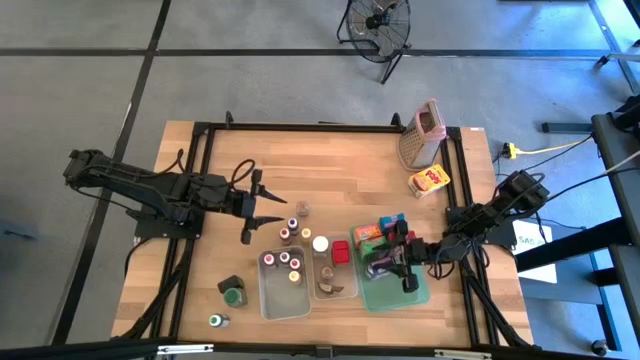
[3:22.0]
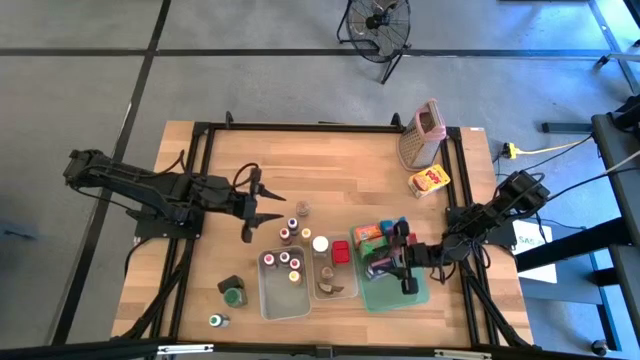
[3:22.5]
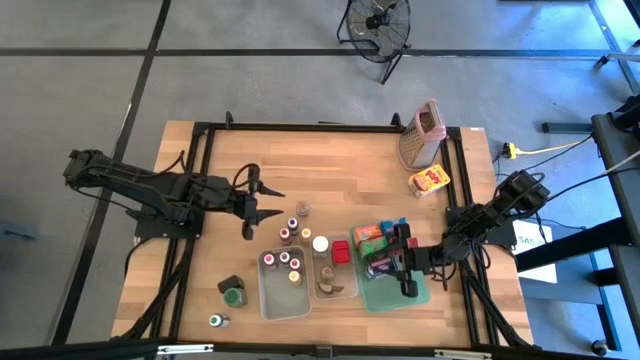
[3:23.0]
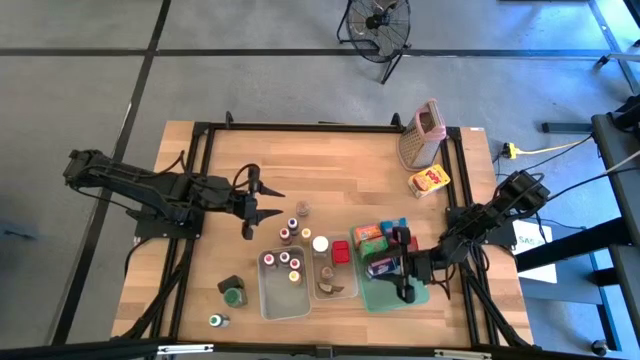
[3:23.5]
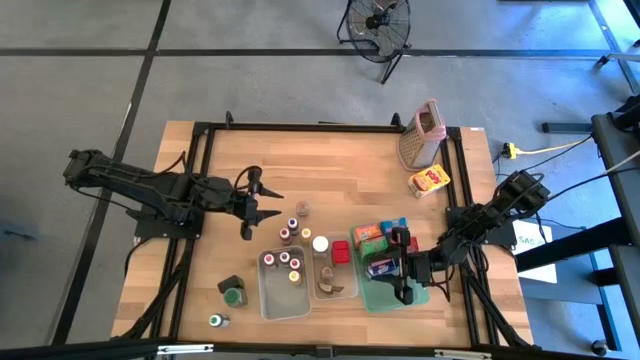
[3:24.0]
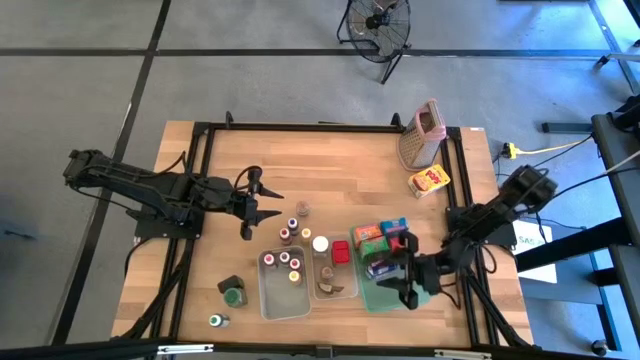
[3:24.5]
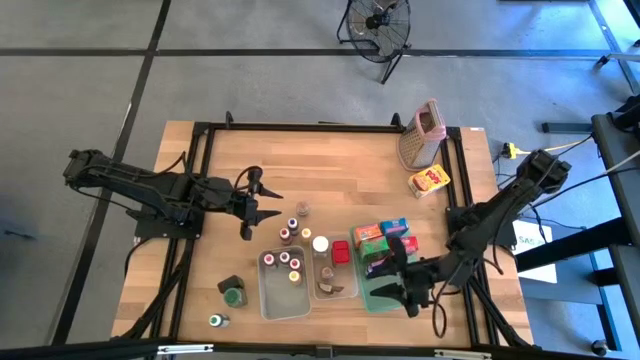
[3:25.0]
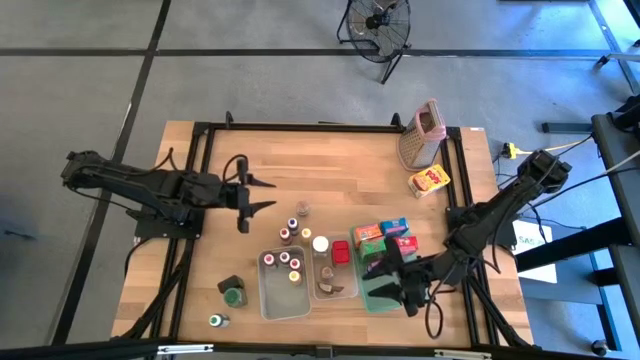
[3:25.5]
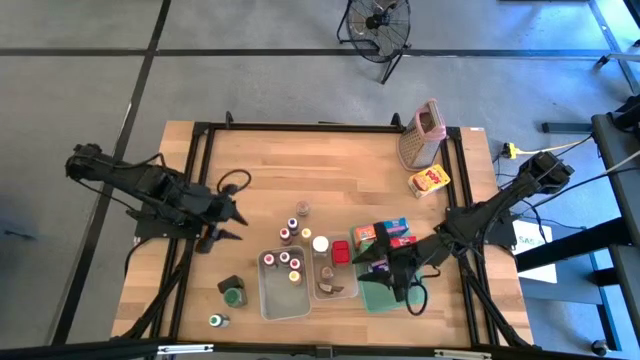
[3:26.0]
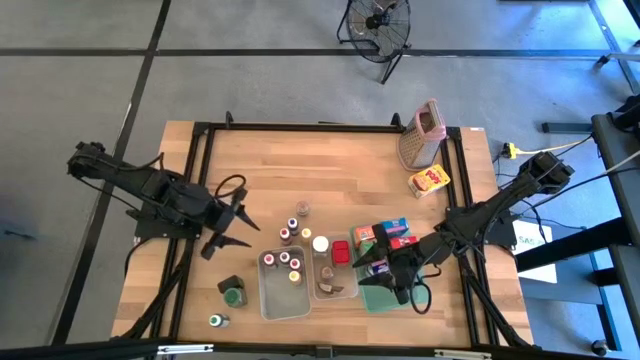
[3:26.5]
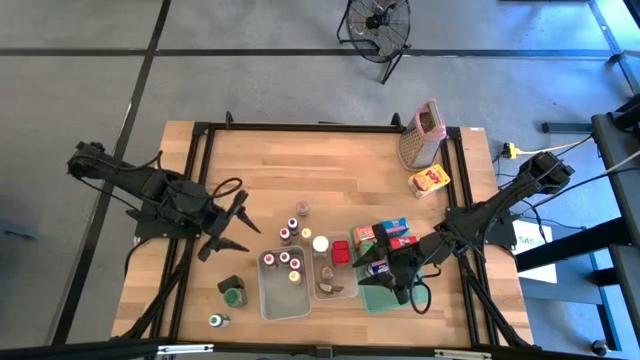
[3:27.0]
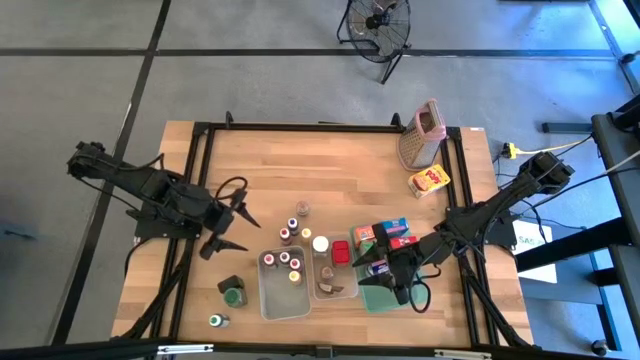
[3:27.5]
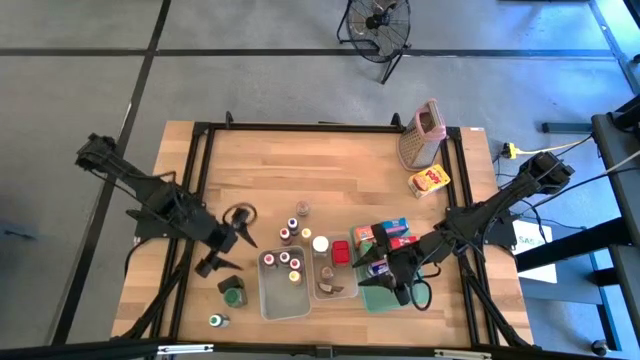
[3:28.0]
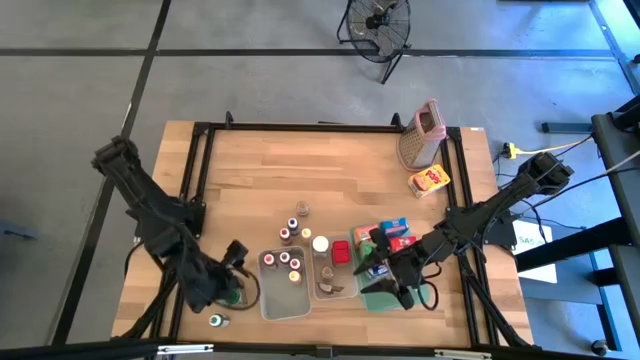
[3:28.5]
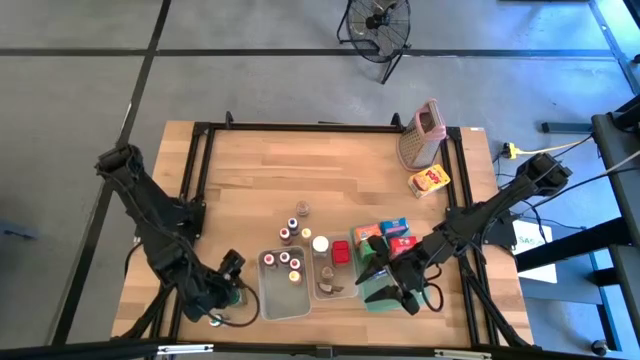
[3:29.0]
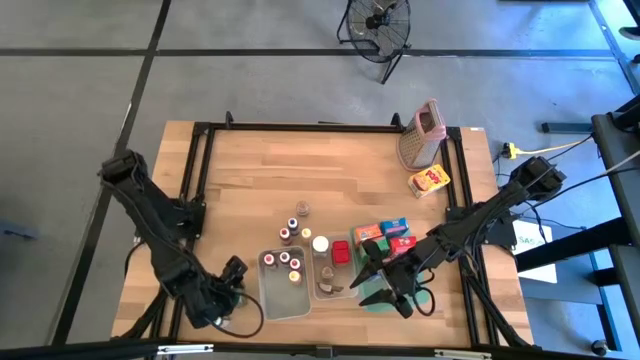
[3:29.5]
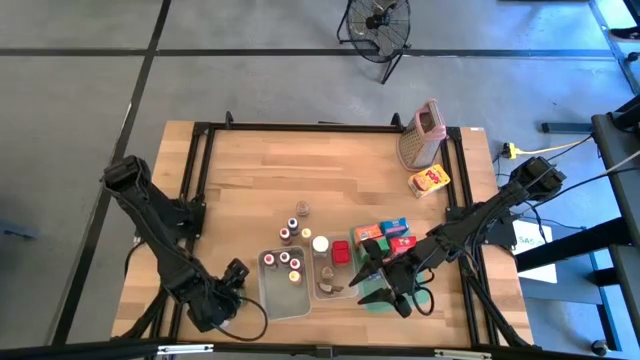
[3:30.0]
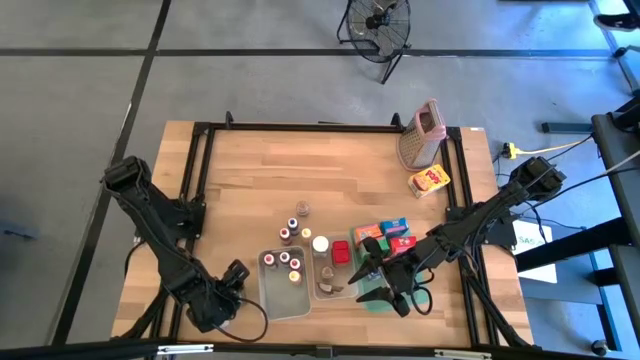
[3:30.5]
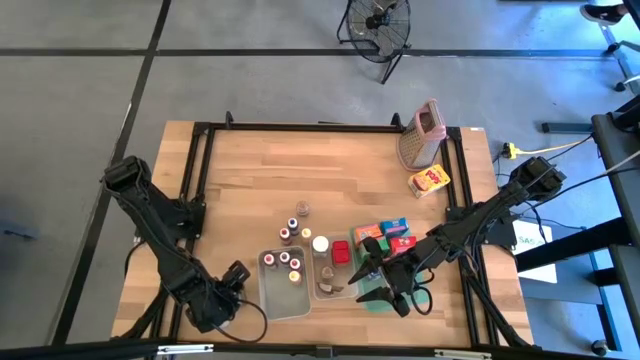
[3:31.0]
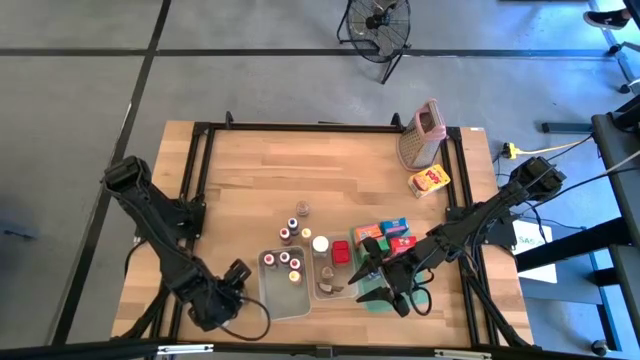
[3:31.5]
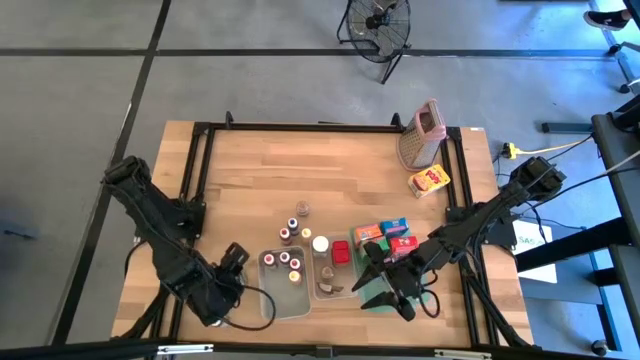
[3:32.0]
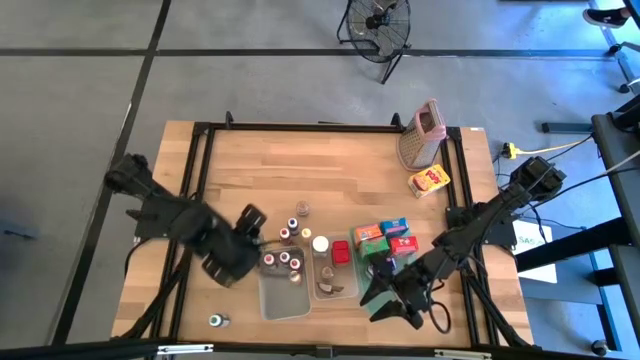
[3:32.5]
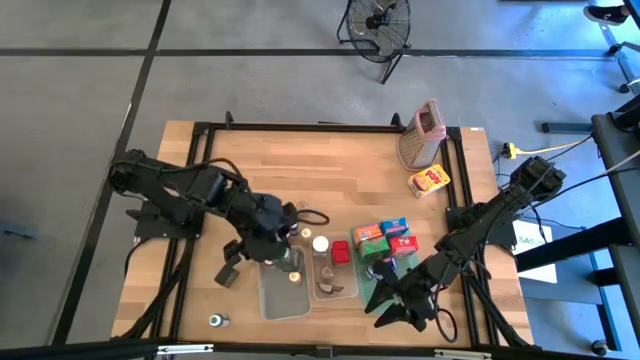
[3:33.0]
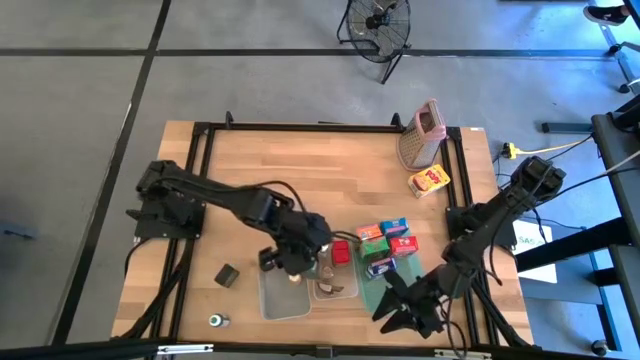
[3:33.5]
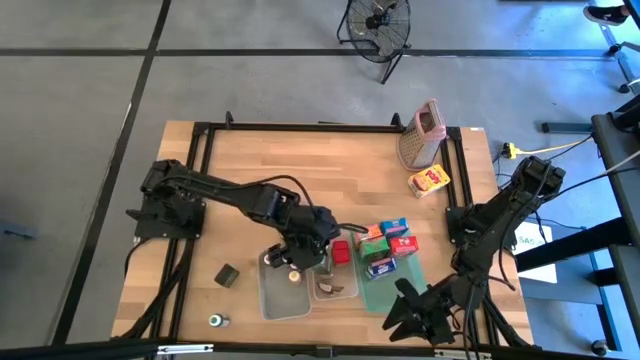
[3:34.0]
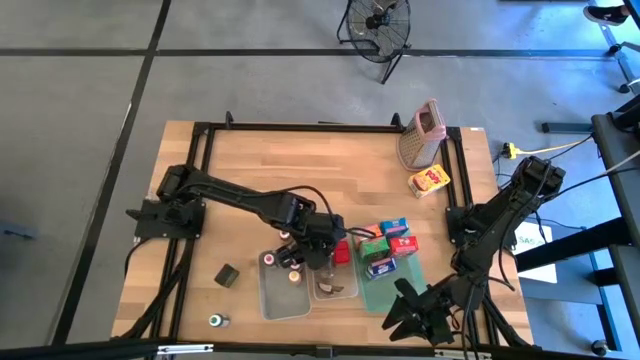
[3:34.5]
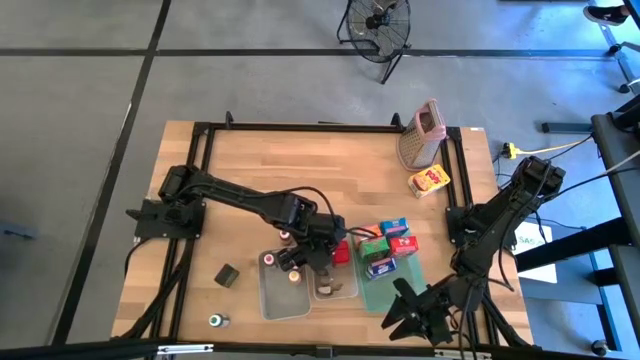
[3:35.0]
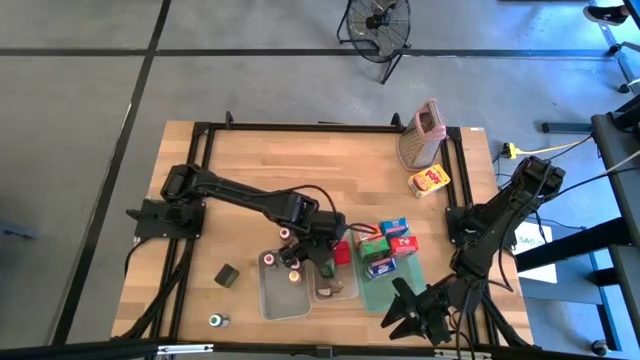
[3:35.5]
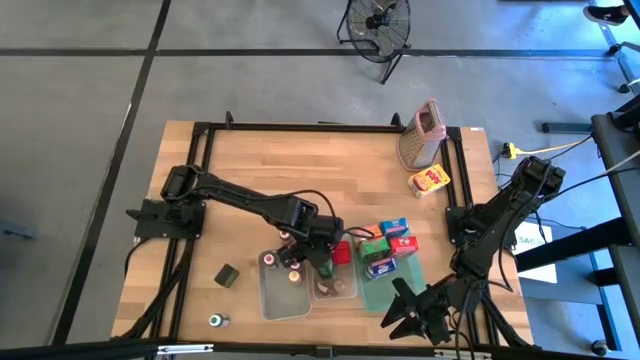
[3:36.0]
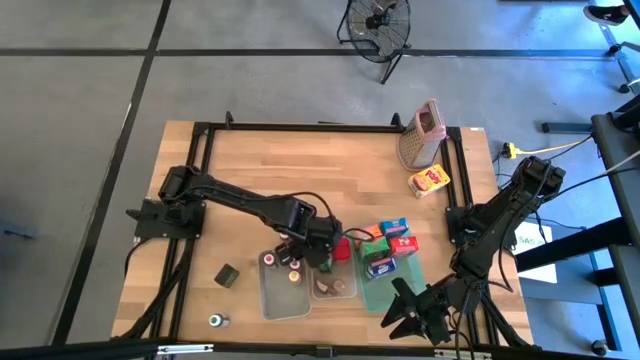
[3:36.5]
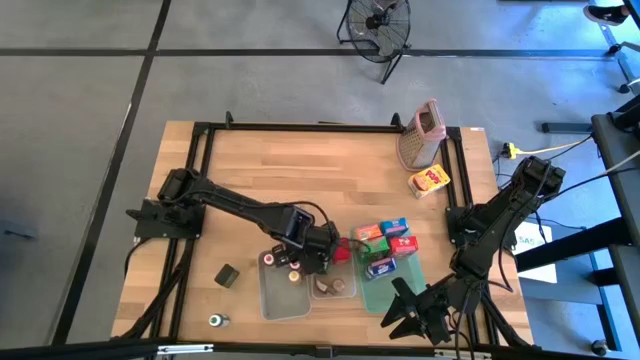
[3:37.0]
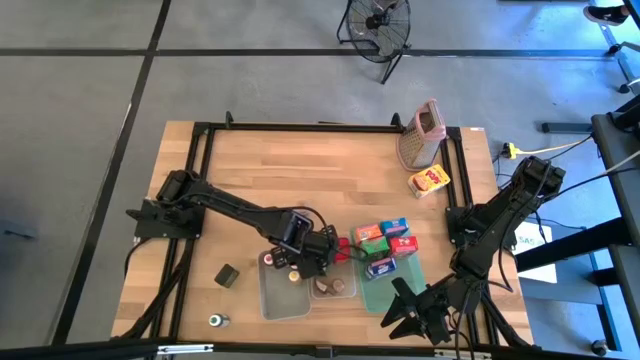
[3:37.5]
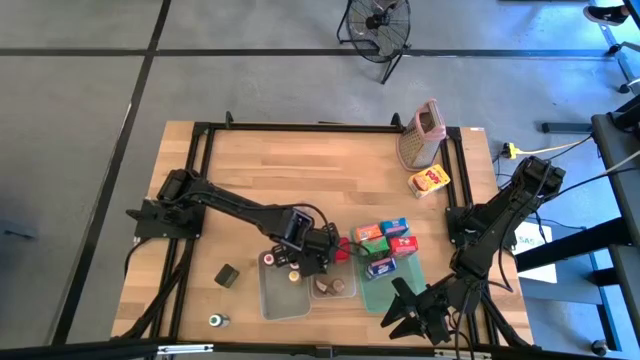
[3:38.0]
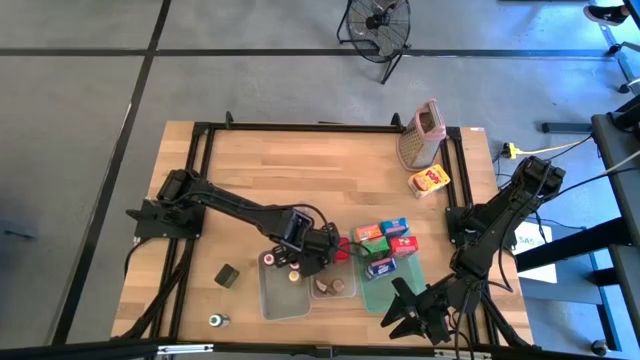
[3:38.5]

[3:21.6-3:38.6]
Task: Pick & Place Kitchen Items
Put the green seasoning bottle into the white bin

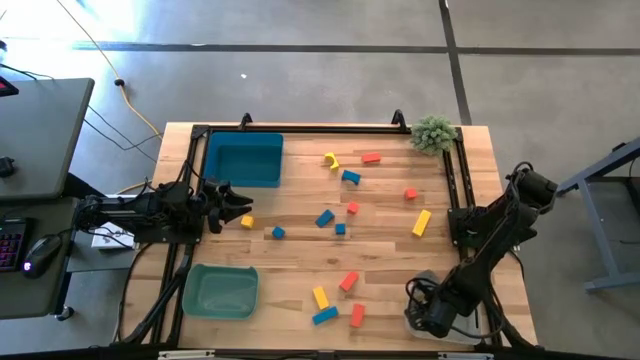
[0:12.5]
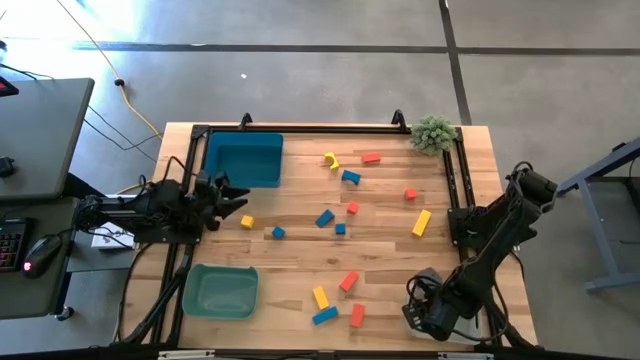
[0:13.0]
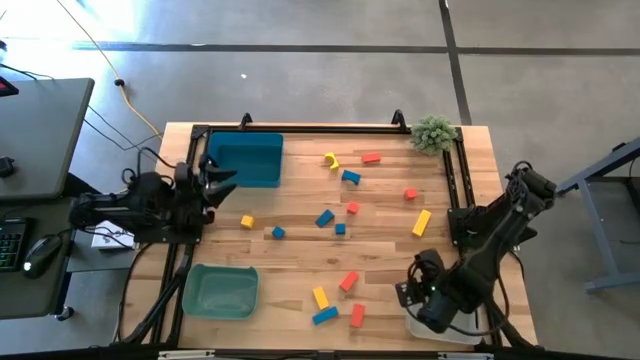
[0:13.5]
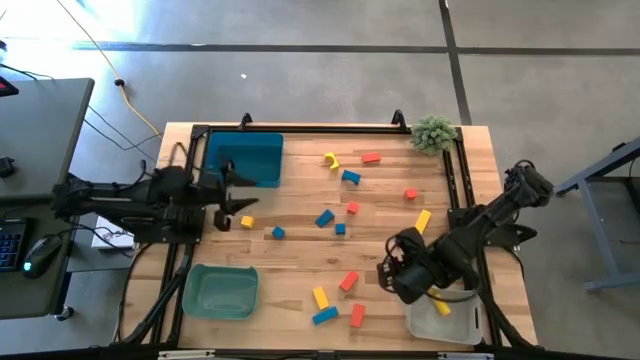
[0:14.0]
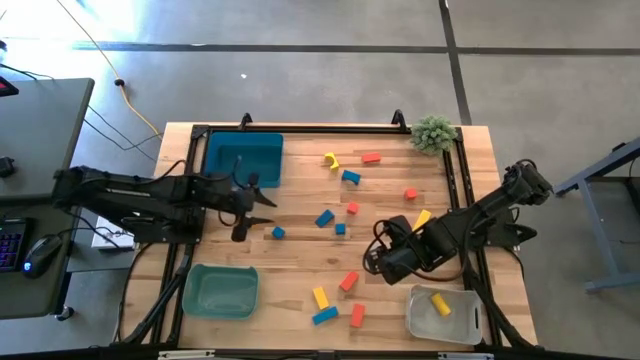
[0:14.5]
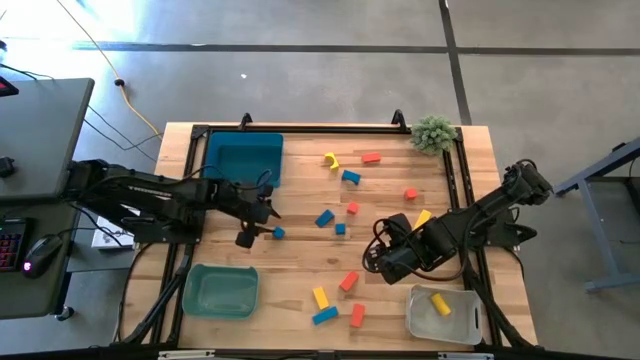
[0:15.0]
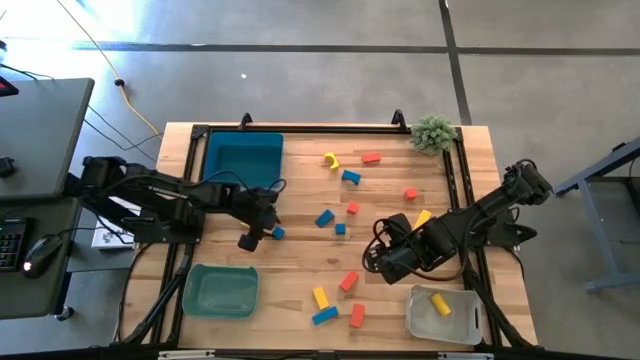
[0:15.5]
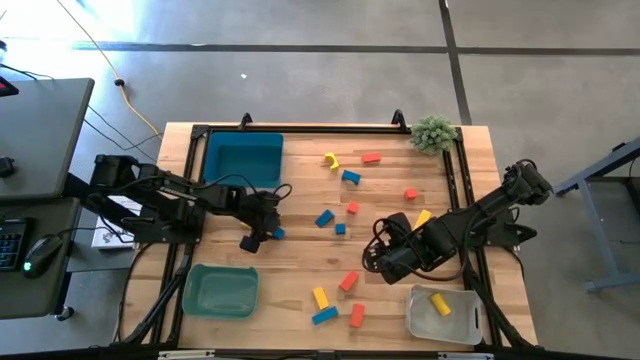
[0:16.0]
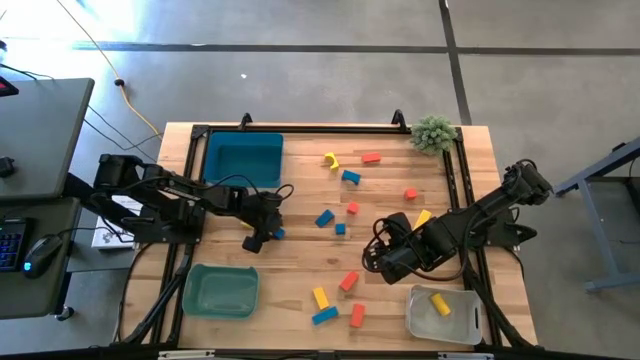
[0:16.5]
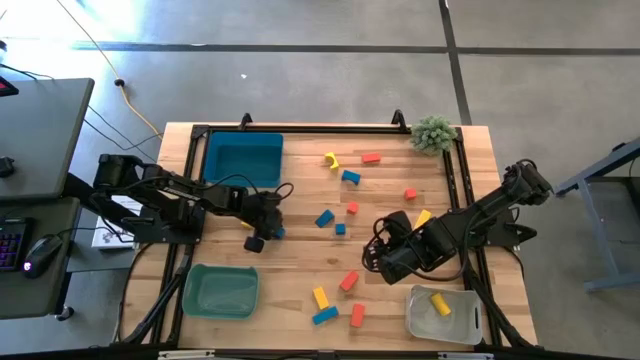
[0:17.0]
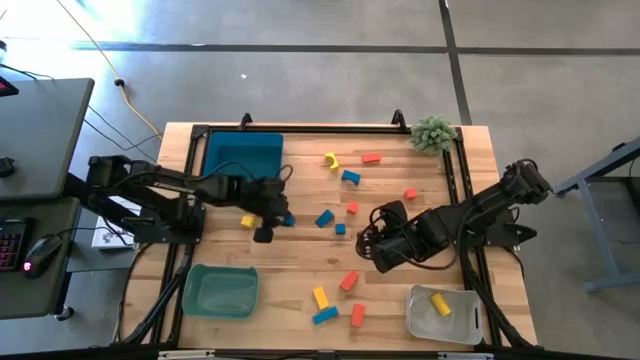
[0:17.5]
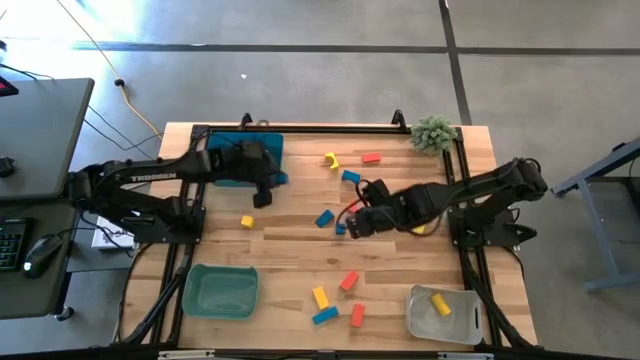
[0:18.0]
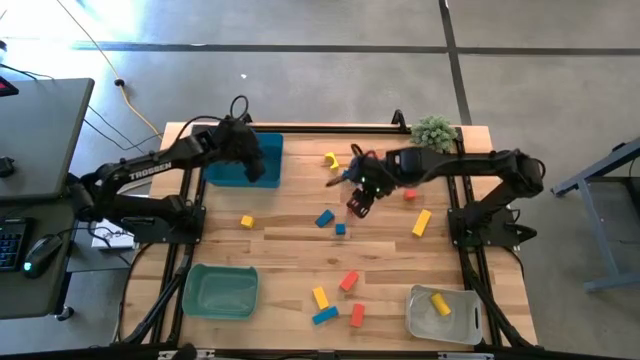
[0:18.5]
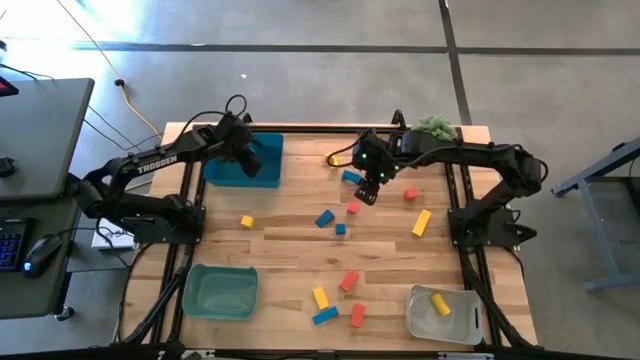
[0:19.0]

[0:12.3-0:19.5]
Task: Sort & place blocks by color
Put the blue block into the blue bin
